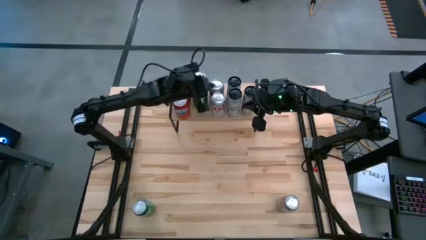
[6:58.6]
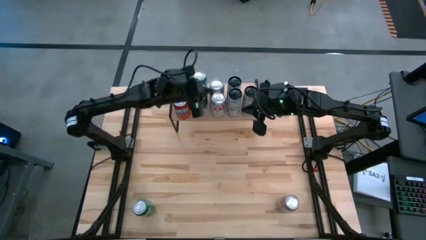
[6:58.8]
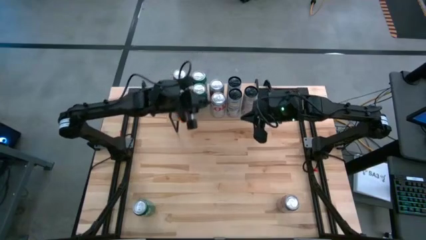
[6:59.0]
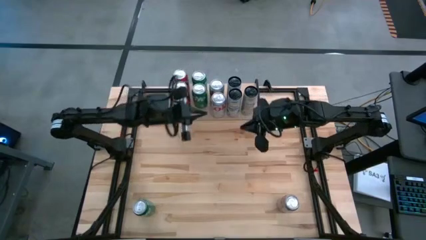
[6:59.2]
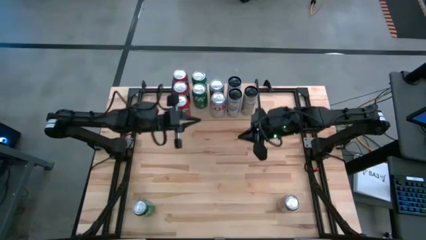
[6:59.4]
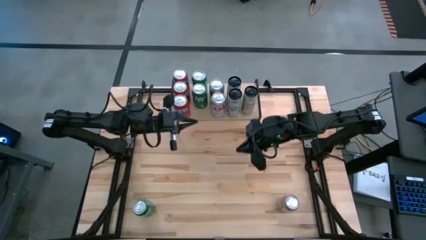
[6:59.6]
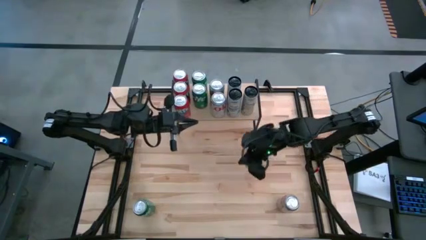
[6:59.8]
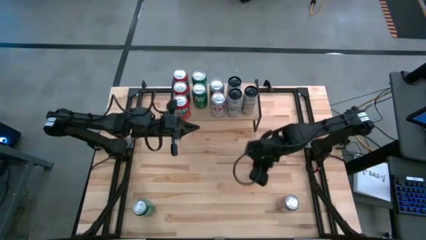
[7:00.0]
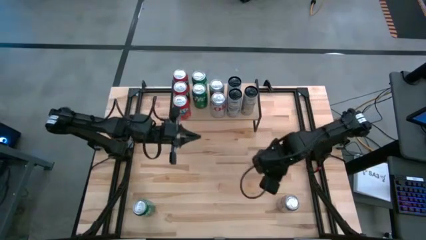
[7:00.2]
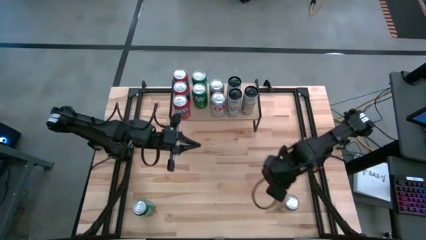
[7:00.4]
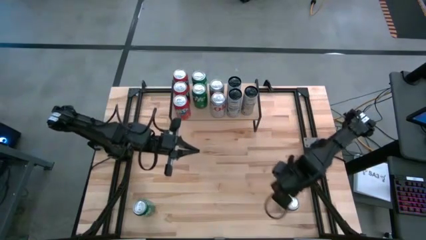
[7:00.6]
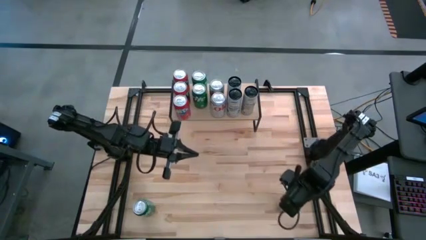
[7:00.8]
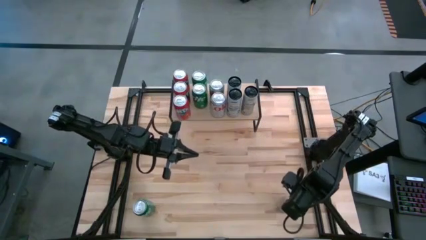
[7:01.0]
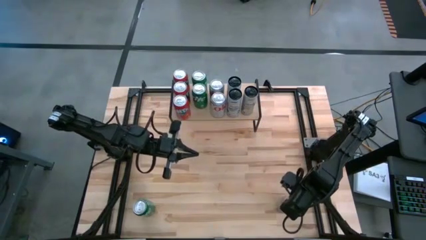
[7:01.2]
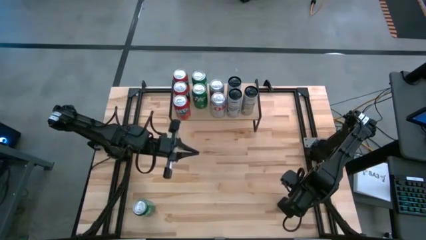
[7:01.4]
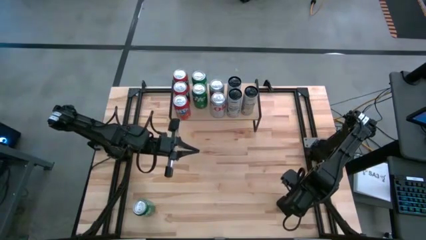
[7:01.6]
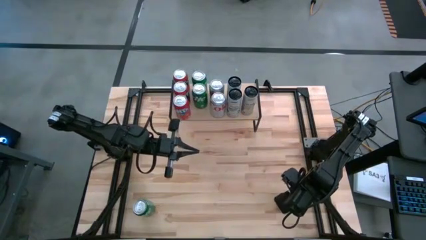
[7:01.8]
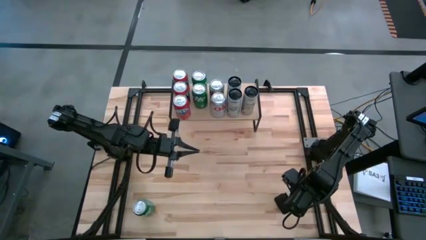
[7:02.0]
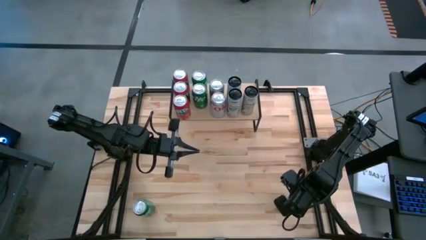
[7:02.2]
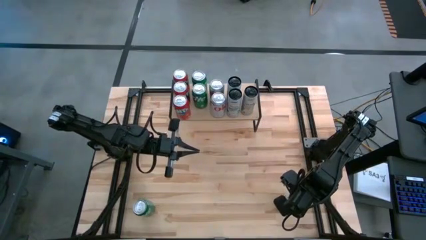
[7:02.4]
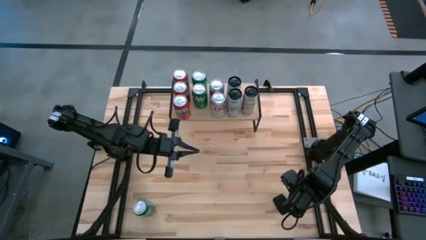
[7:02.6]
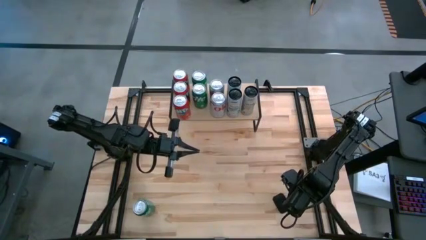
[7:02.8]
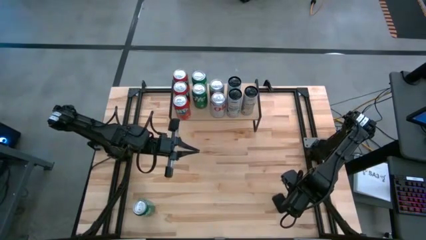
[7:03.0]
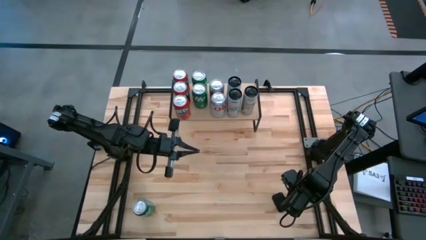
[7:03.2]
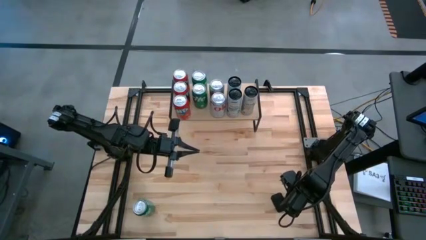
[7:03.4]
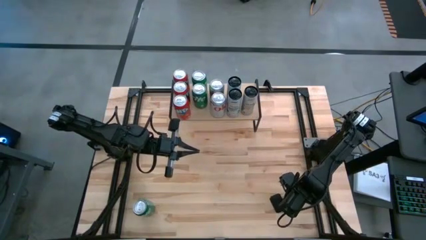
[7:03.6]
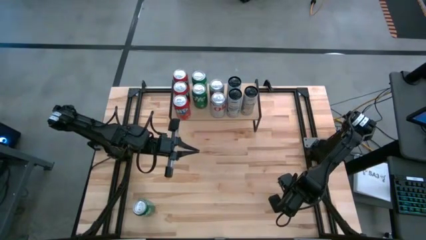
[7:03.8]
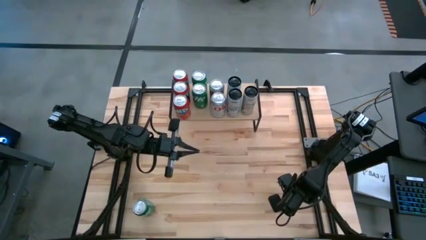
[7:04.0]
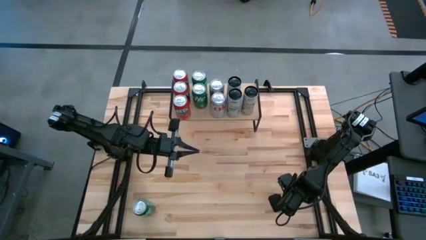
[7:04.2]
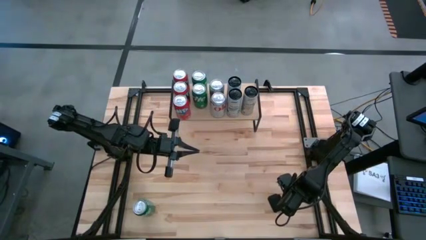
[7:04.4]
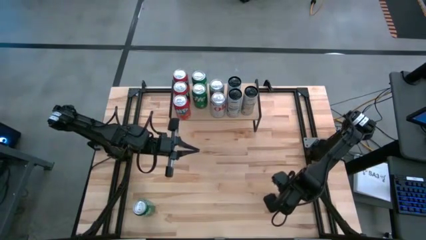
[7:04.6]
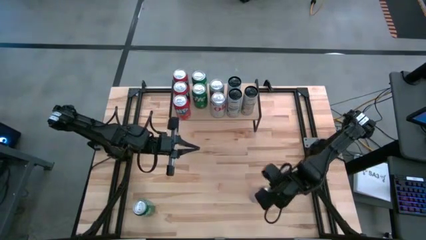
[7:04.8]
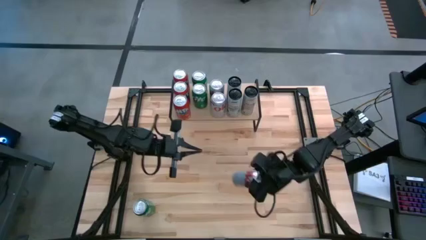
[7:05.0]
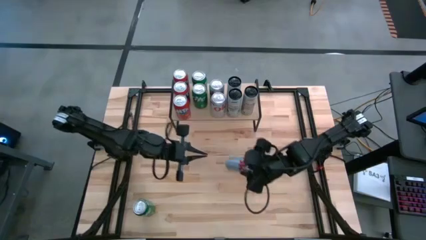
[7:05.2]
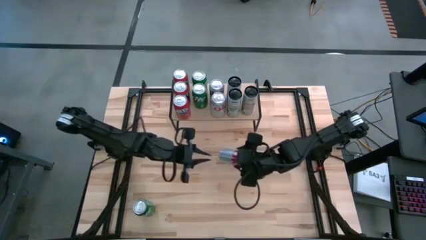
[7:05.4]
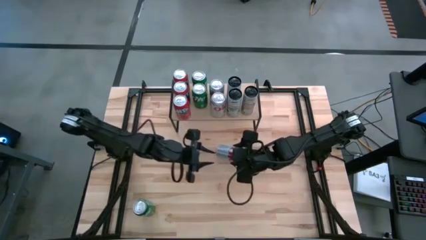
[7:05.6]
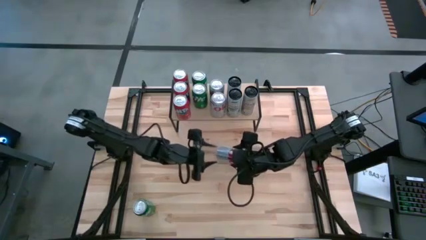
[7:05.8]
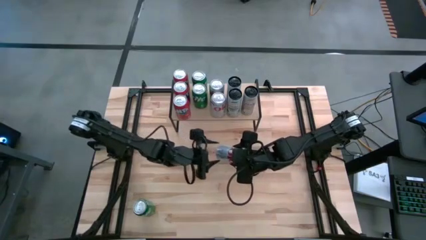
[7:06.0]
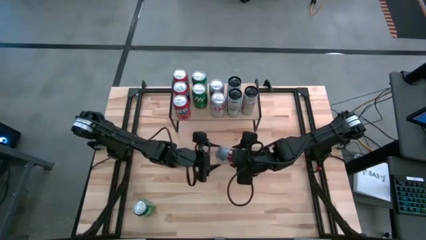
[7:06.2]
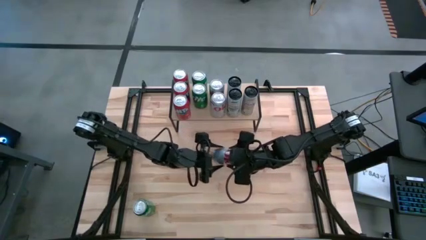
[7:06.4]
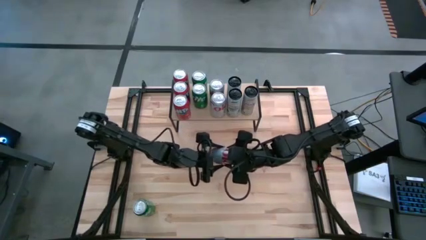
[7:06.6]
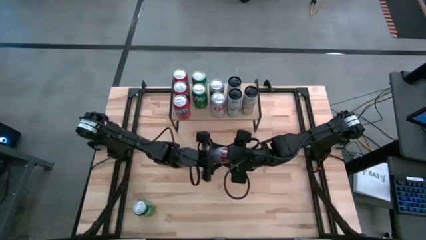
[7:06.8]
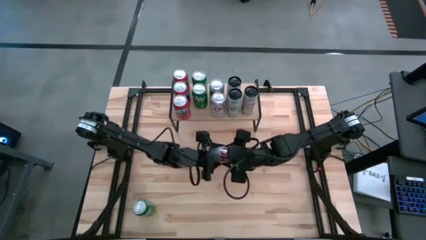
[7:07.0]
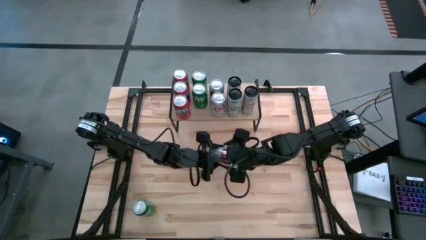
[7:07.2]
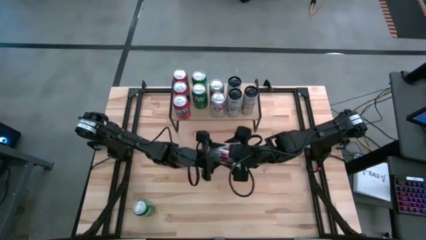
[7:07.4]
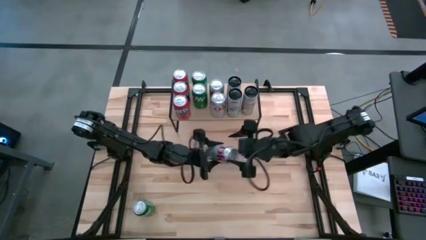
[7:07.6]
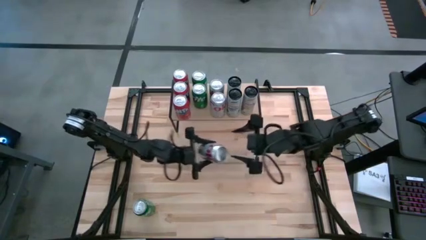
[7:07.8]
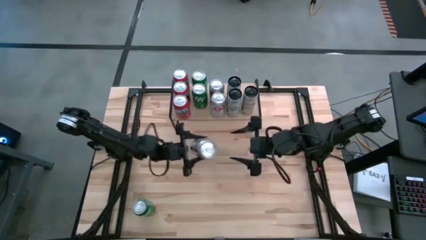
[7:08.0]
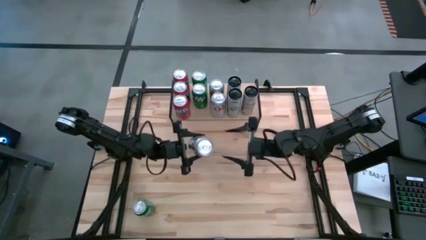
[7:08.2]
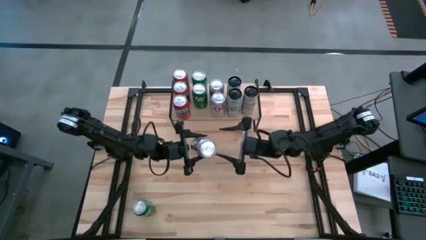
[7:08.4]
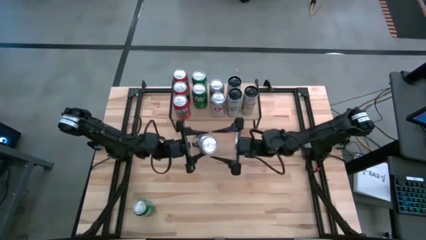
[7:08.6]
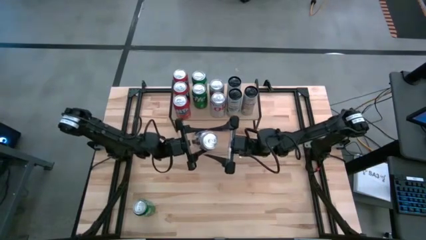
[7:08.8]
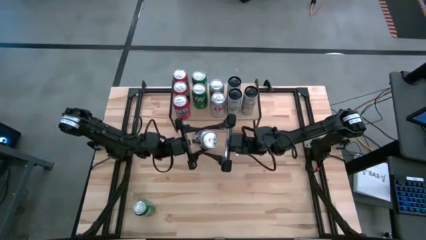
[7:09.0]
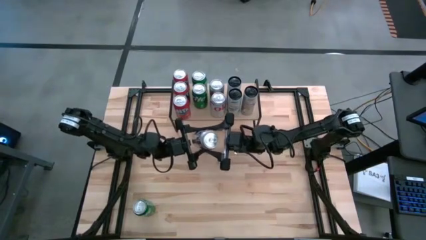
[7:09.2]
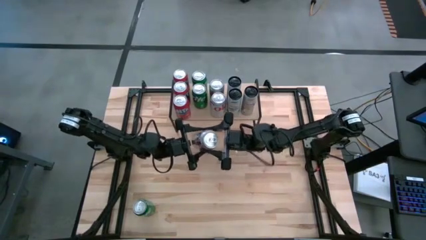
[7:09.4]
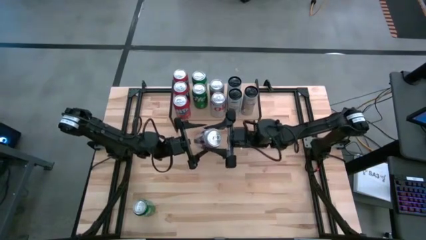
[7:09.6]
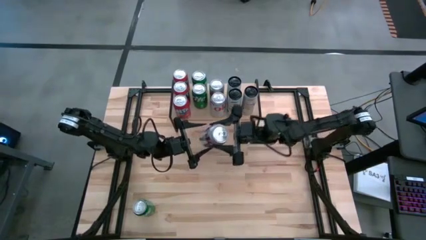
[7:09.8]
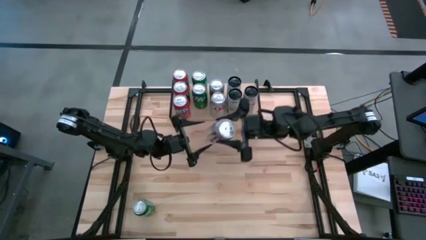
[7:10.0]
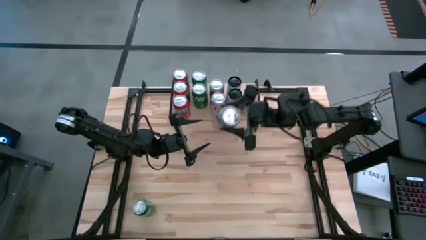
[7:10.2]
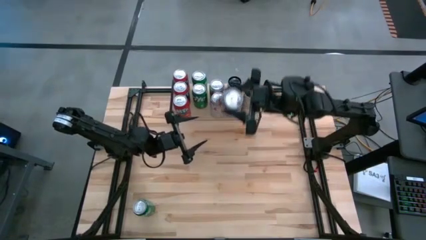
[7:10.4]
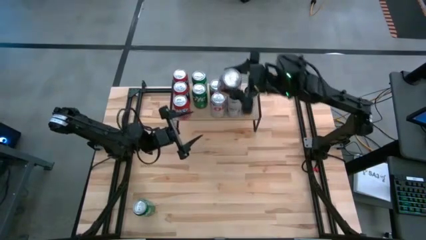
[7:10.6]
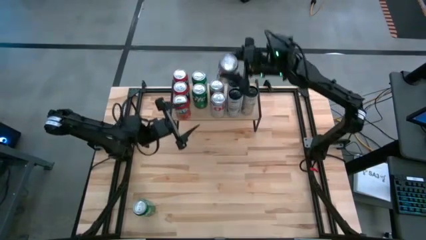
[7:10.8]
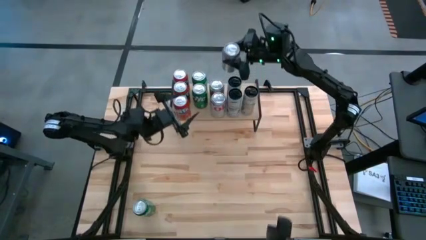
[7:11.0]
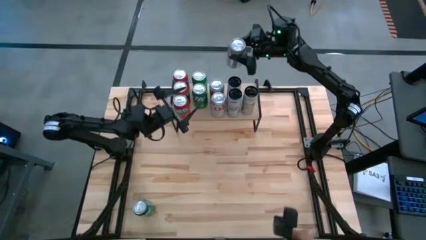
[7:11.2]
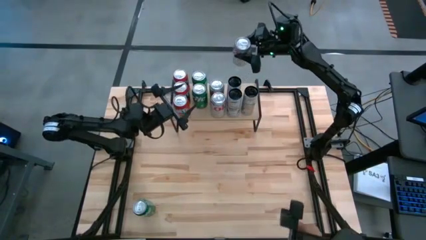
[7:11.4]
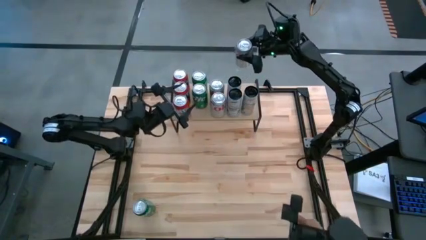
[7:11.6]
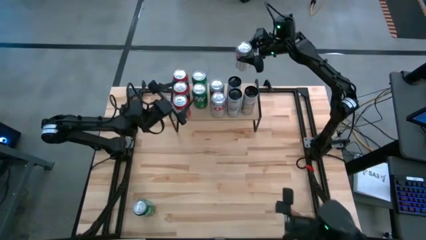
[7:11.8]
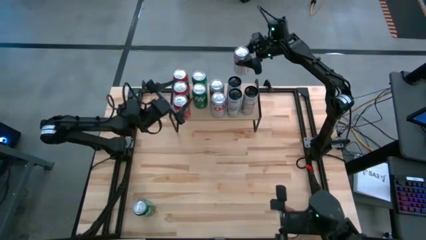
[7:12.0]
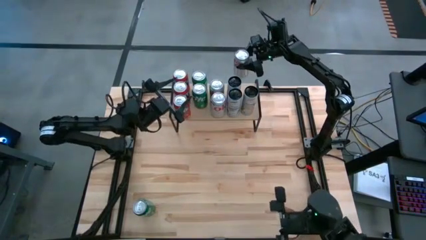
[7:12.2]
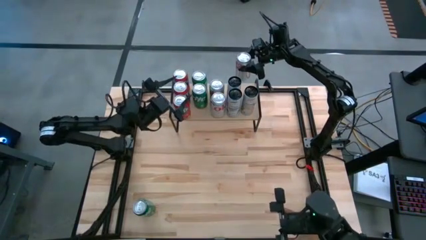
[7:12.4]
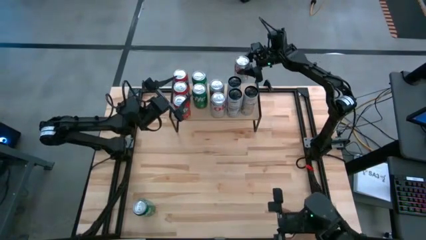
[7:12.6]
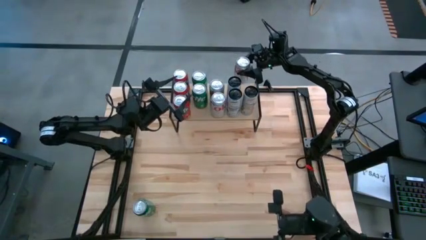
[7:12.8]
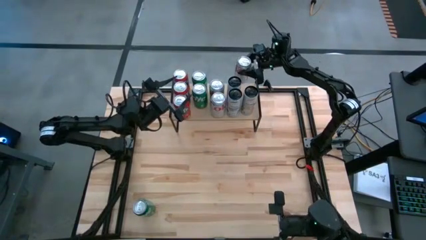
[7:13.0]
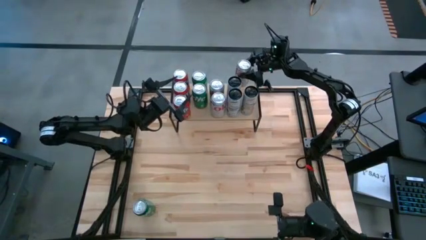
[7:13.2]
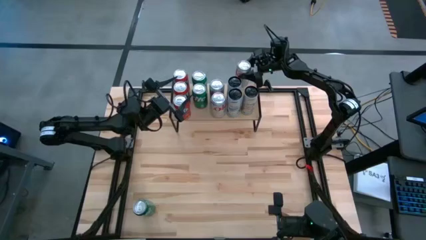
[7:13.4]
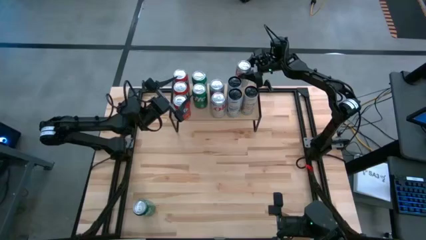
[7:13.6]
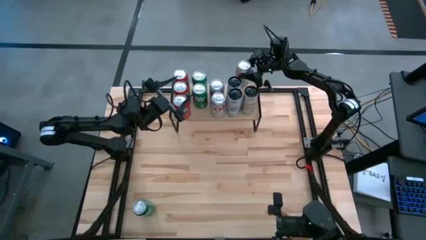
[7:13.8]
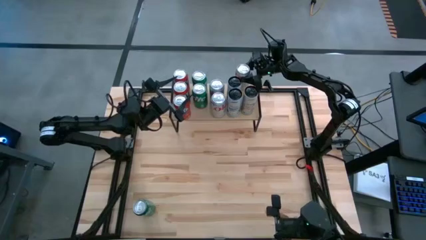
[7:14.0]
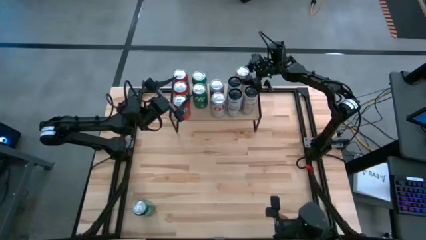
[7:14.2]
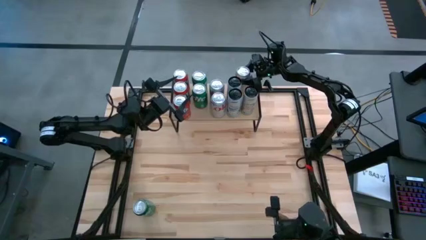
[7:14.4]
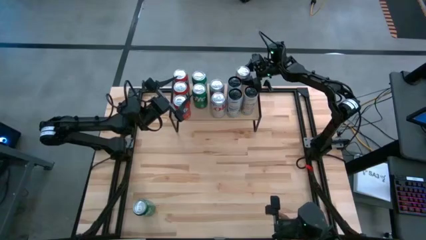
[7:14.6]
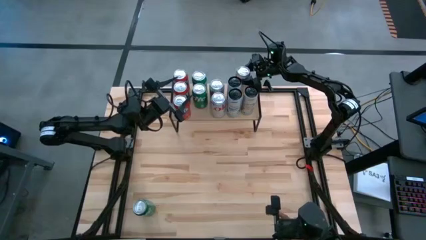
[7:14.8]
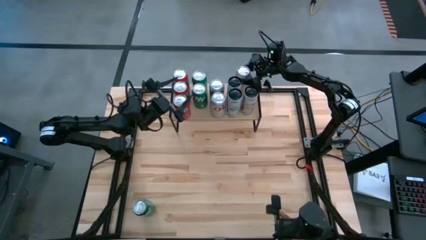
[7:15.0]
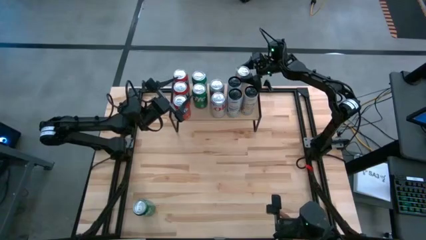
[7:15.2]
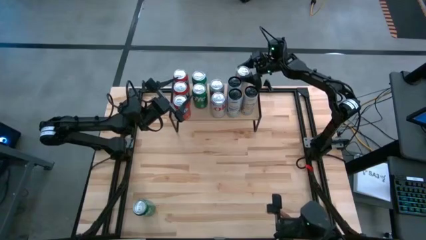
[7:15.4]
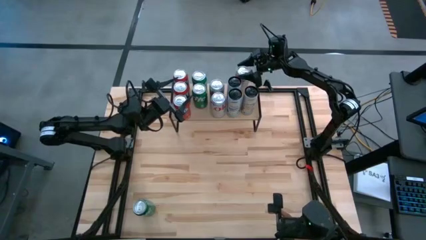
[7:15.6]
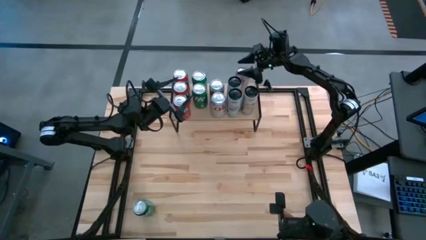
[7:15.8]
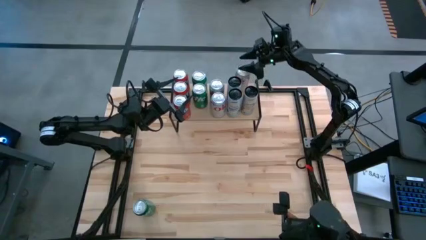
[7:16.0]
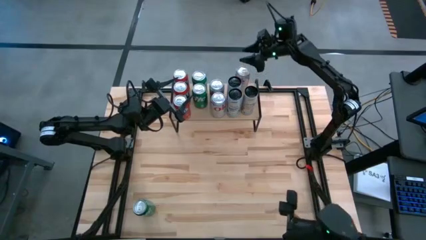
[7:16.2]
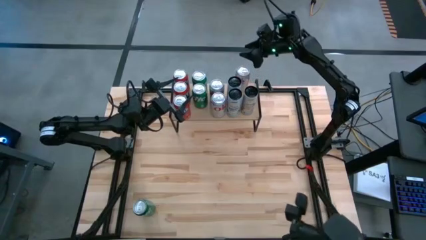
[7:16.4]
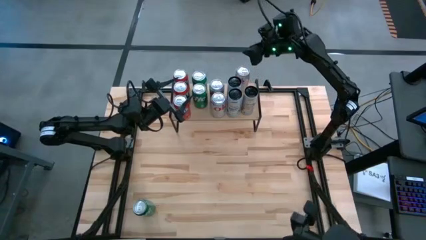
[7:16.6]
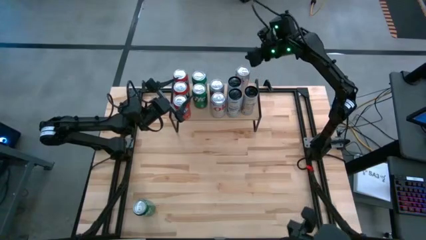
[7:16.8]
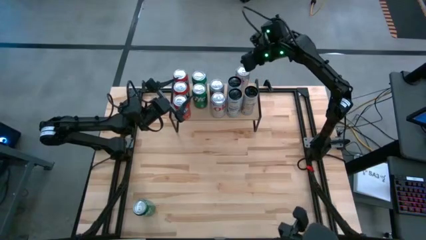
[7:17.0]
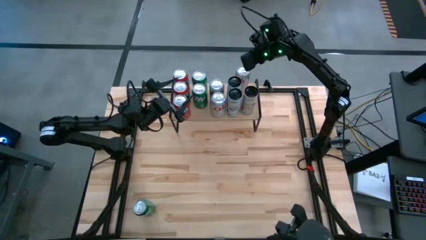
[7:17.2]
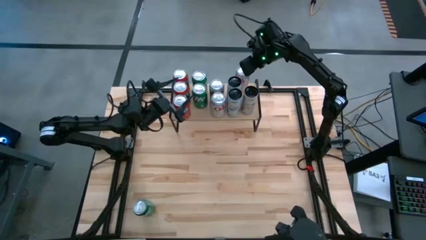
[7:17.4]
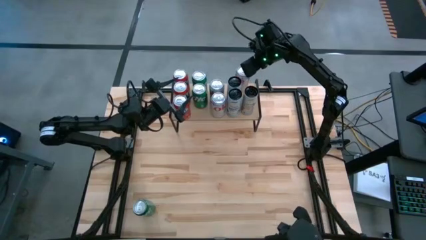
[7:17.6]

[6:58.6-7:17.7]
Task: Place canned beverage on shelf
Put the silver soda can on the shelf aligned with the other silver soda can
